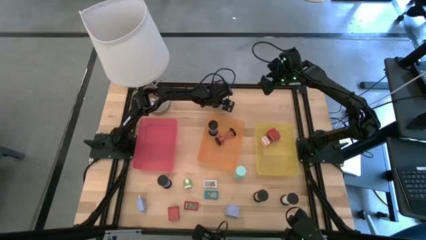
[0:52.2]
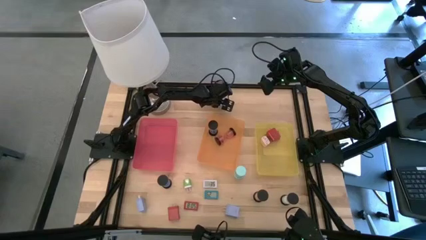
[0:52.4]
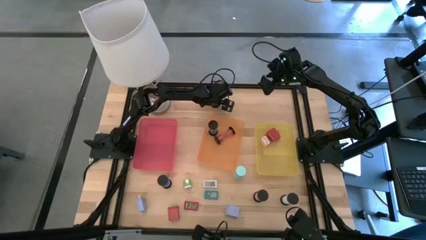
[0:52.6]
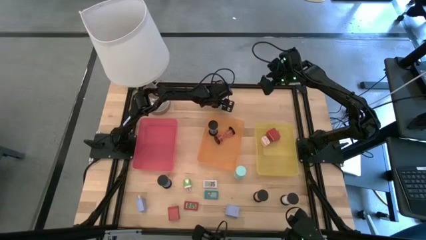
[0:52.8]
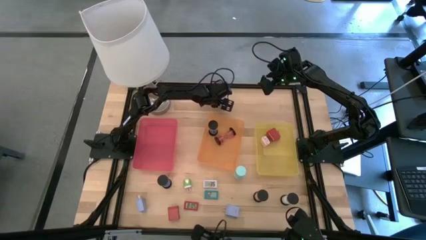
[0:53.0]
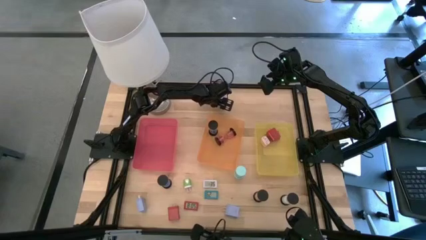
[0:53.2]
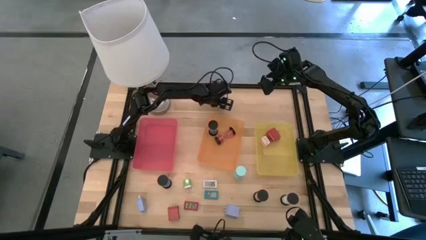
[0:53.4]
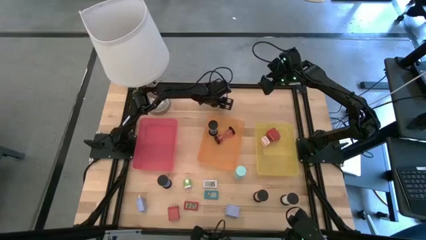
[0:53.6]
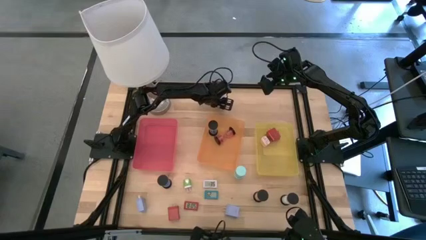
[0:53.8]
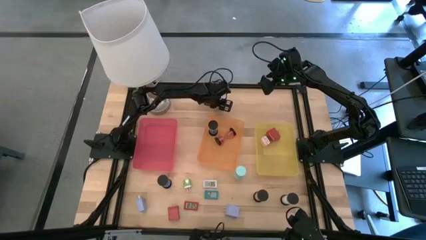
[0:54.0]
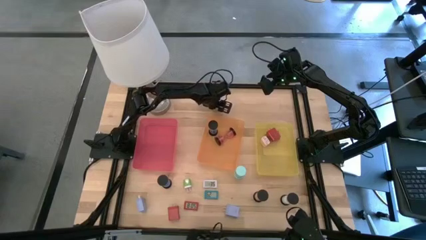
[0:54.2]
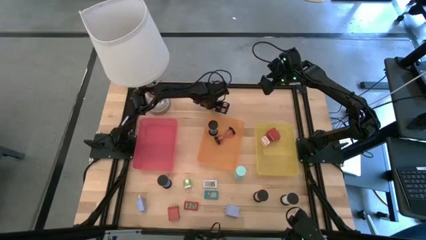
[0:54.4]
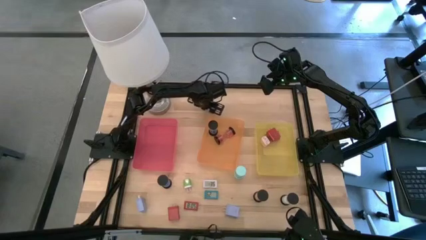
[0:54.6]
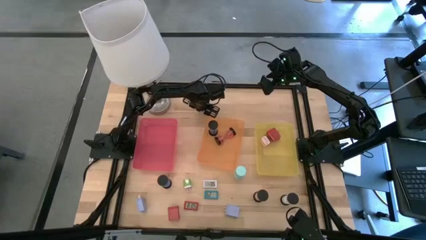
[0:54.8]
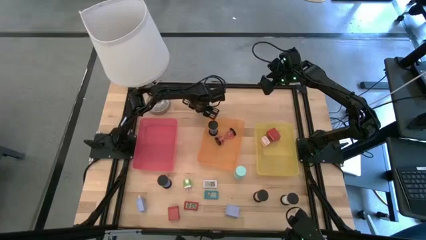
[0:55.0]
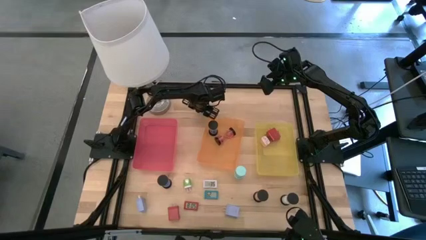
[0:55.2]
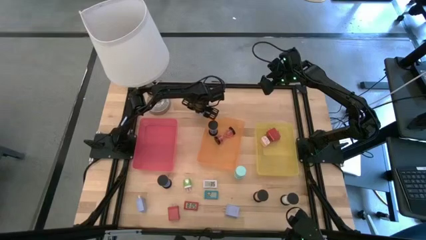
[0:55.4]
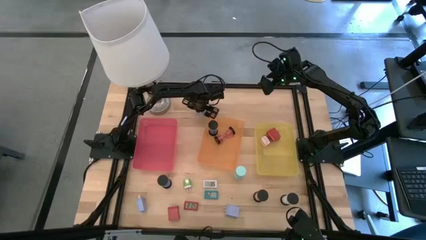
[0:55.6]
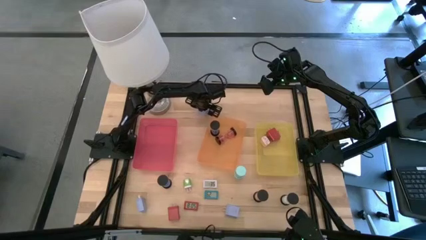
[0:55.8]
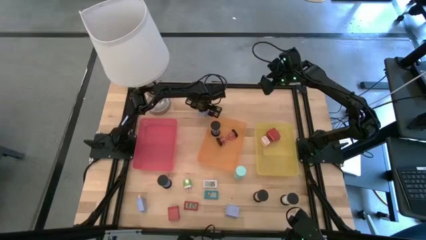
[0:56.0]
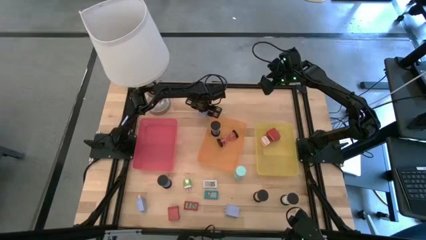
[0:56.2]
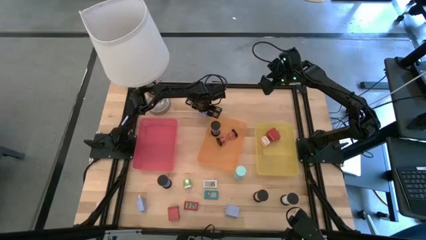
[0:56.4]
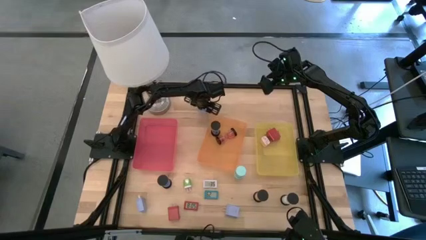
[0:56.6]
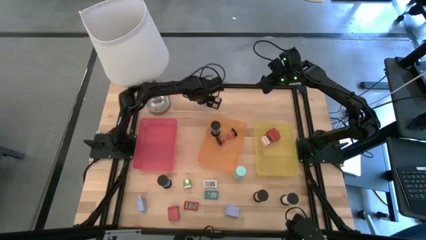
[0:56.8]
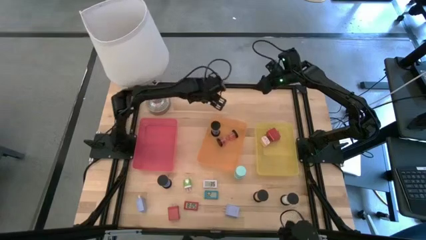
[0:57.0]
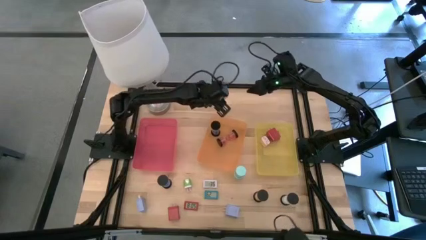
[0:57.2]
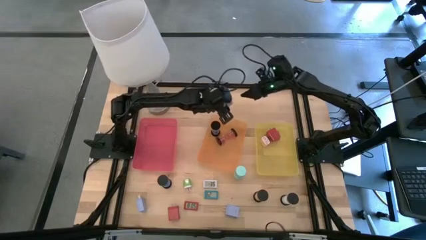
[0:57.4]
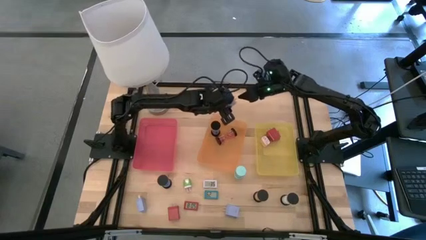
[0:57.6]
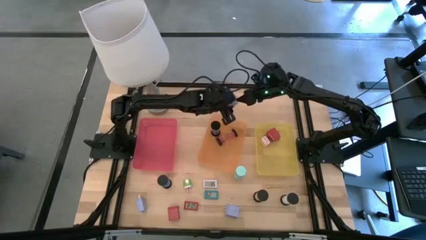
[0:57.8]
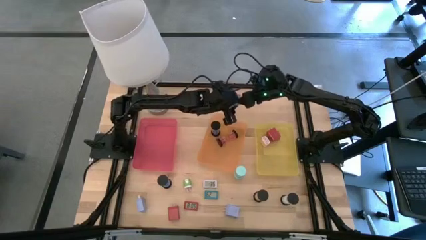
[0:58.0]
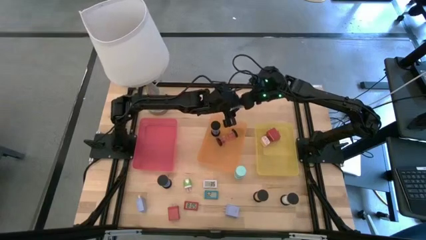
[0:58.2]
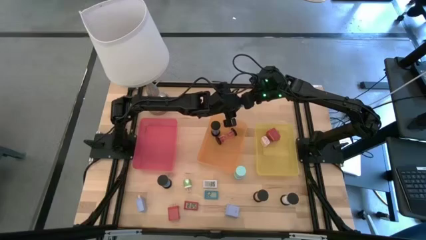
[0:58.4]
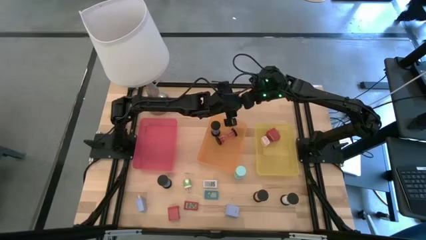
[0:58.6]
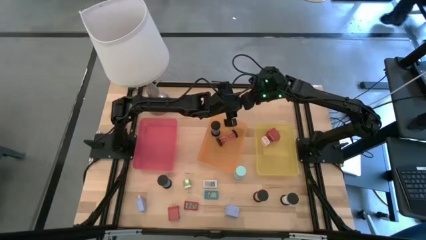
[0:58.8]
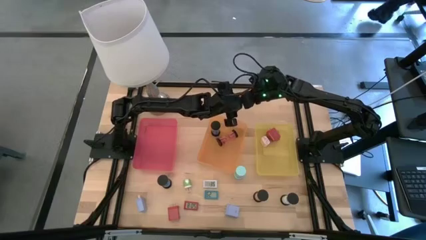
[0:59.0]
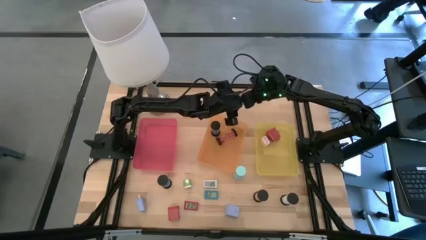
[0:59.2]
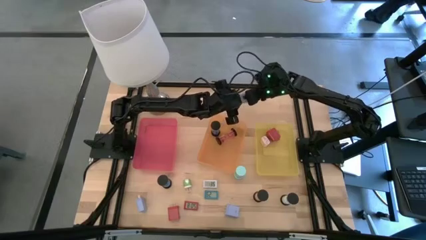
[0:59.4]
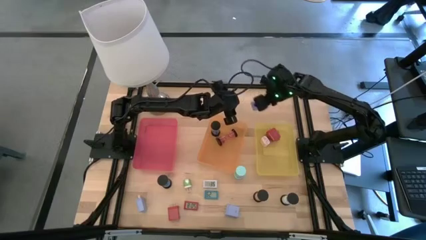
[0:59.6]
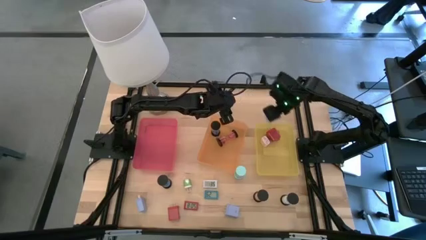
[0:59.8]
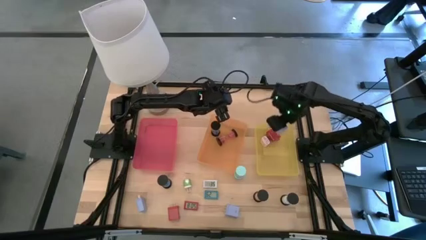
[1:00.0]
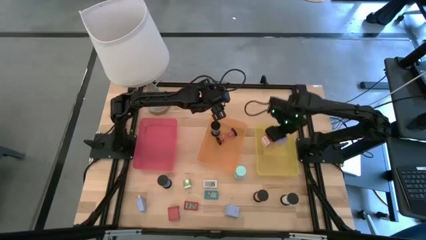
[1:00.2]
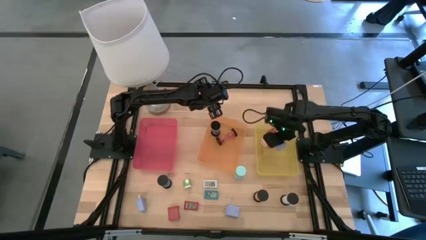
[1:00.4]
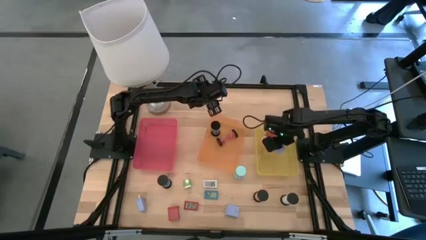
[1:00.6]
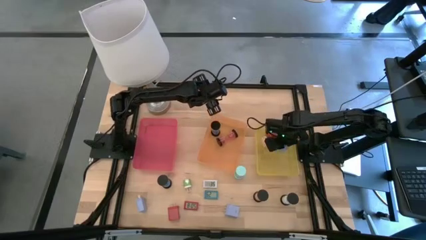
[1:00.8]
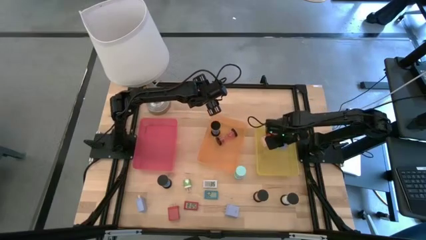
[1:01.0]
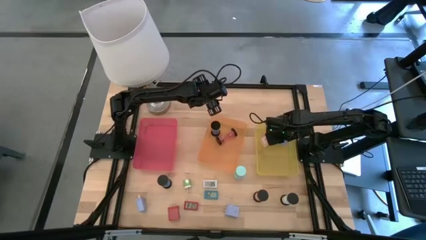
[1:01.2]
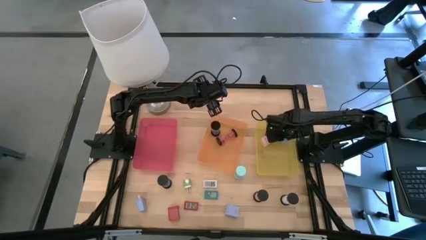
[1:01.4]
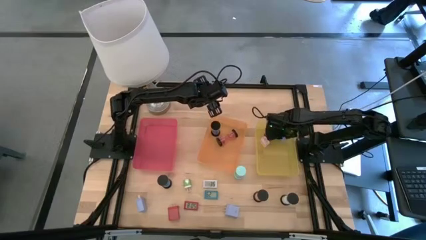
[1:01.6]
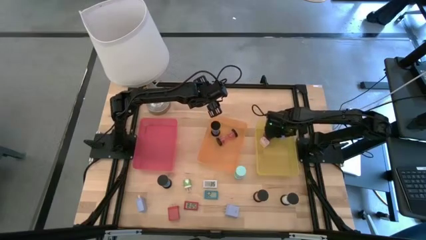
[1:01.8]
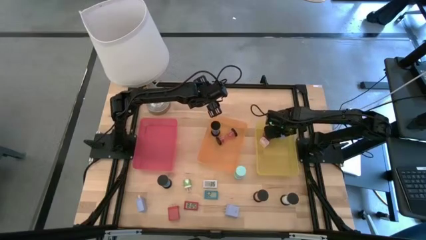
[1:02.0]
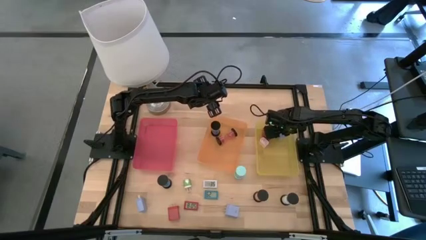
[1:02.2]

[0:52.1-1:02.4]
Task: Pick & Place Office items
Put the top light blue charger adapter into the yellow bin

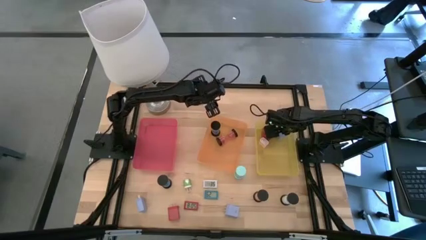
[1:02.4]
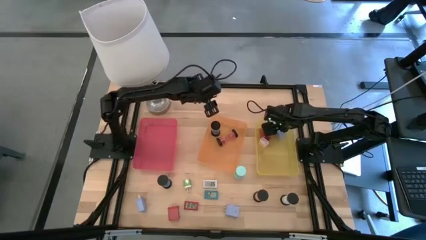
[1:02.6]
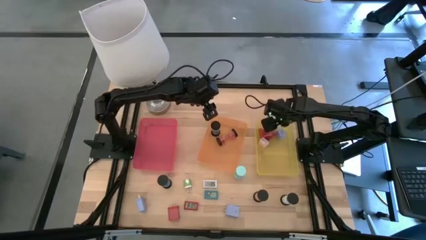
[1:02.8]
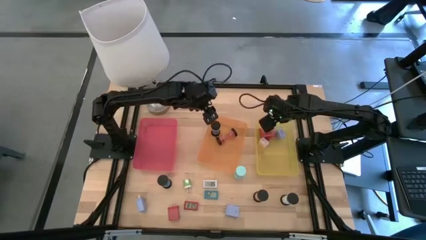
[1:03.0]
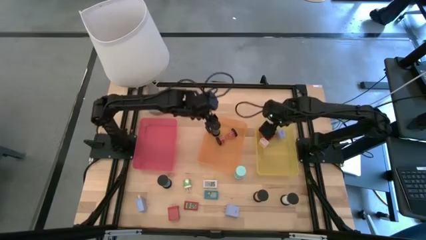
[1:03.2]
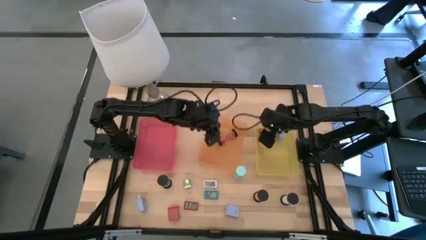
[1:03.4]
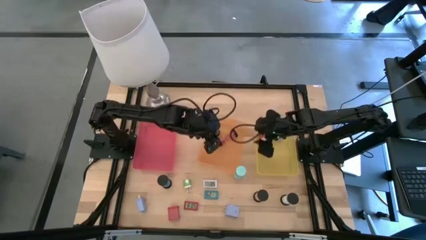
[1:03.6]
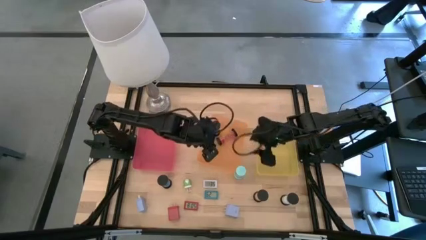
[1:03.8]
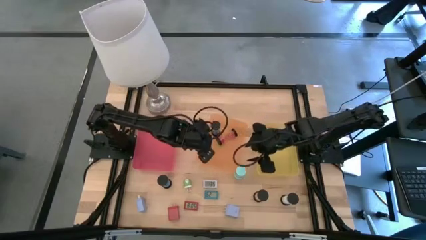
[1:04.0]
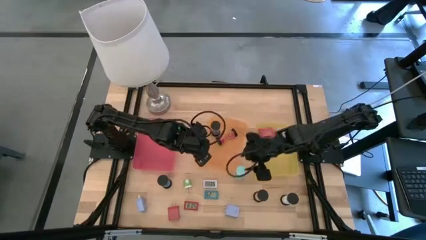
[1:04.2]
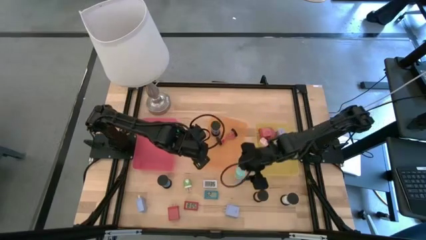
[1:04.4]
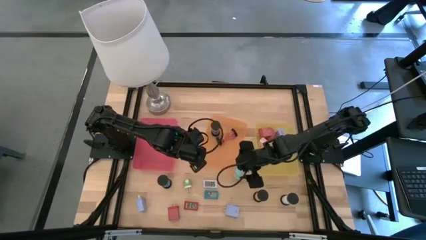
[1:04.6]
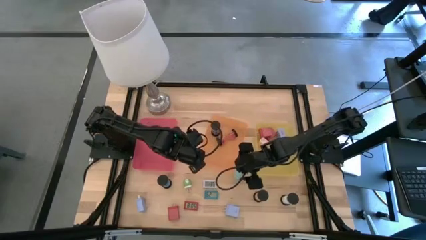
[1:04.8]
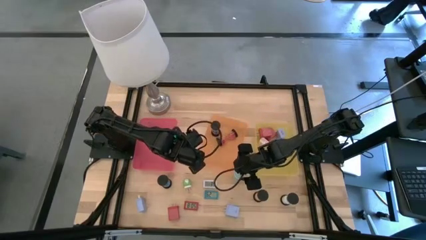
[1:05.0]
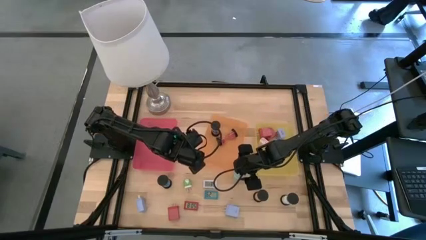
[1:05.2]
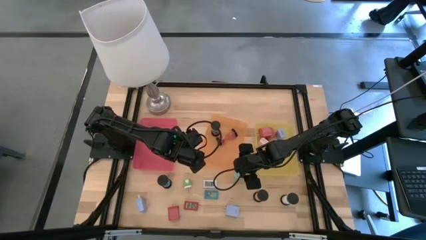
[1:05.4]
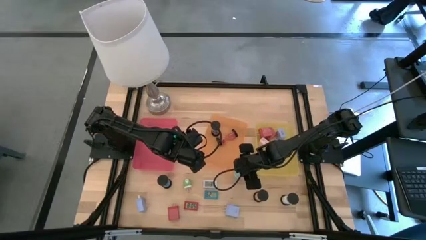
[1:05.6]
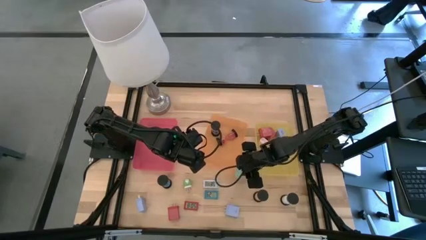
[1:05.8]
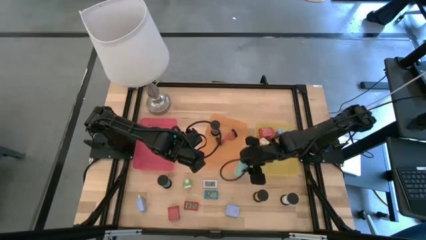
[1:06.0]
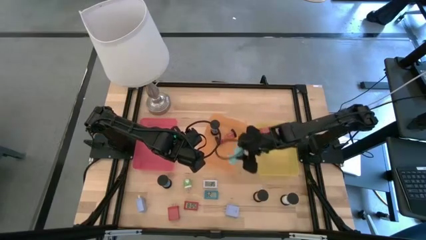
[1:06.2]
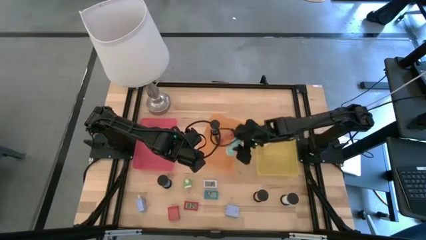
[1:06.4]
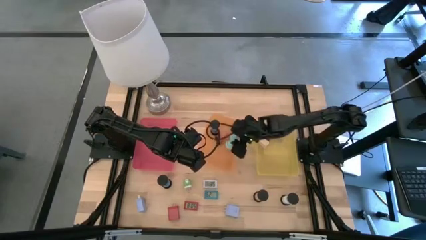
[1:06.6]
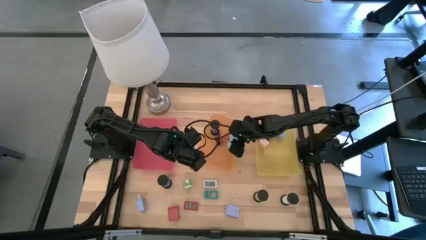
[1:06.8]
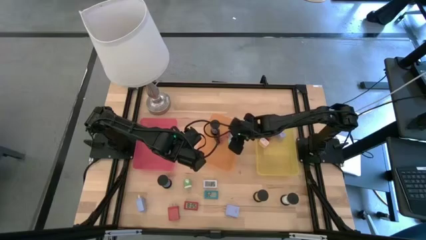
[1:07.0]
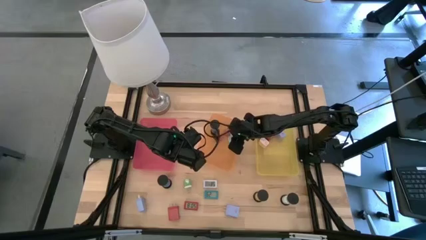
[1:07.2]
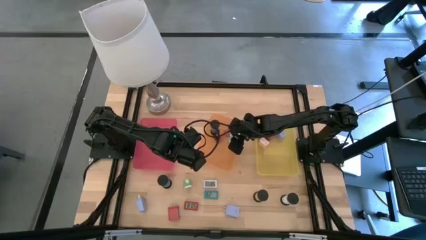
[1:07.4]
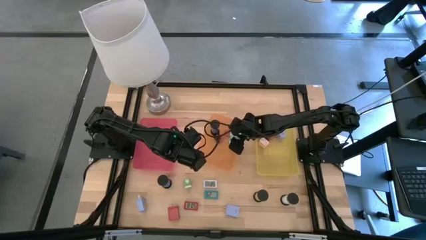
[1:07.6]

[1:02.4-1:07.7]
Put the light blue hourglass into the orange bin

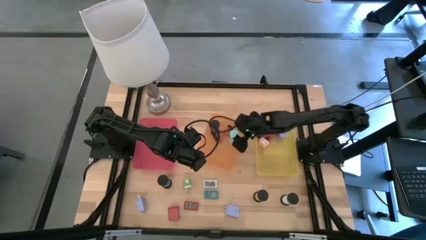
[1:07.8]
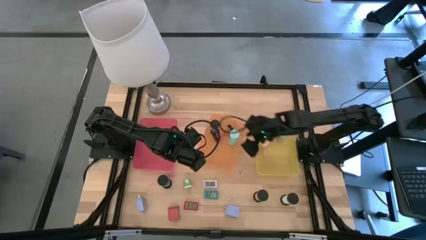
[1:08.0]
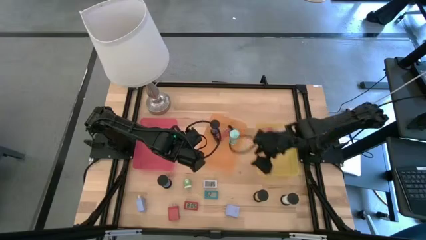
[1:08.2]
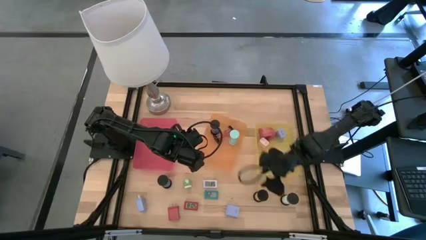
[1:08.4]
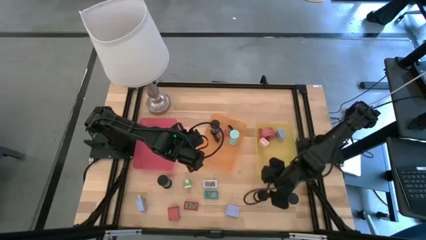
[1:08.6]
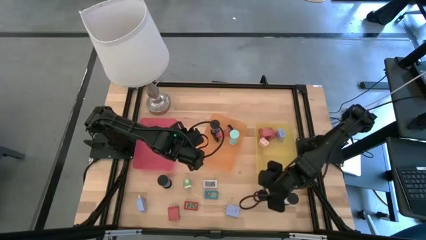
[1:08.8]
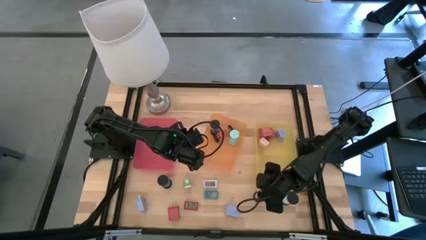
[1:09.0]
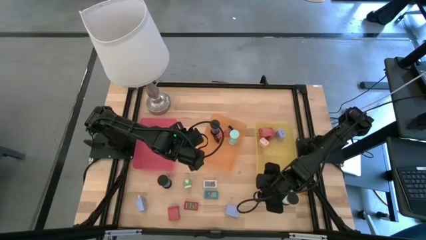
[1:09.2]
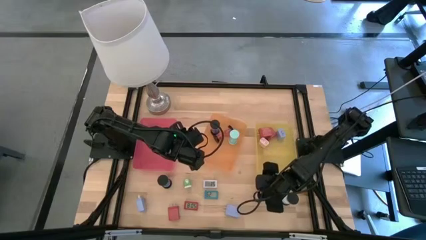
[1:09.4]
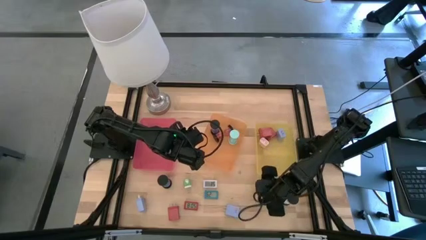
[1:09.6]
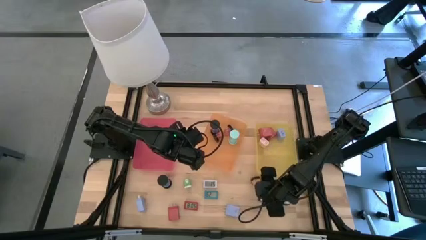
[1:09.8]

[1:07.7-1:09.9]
Put the orange hourglass into the orange bin
